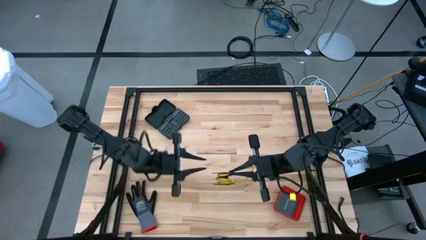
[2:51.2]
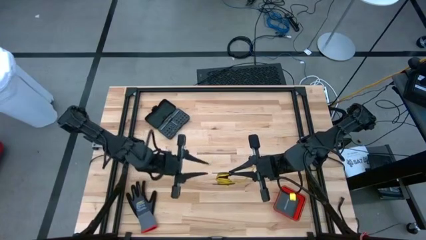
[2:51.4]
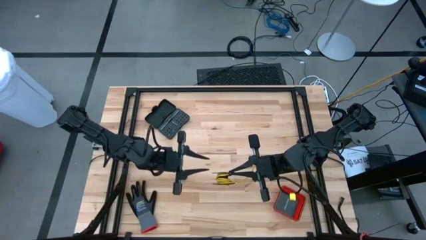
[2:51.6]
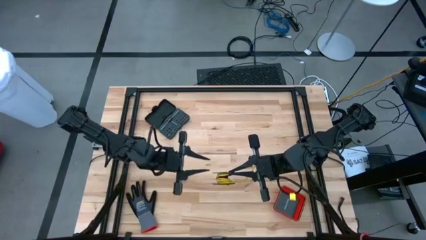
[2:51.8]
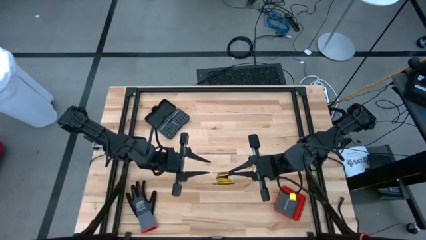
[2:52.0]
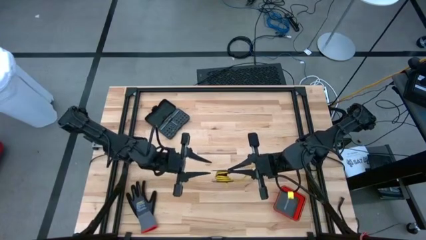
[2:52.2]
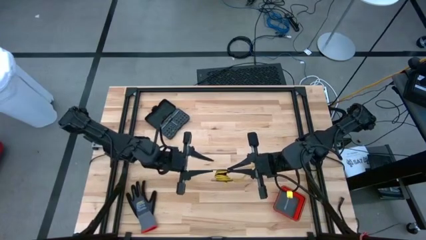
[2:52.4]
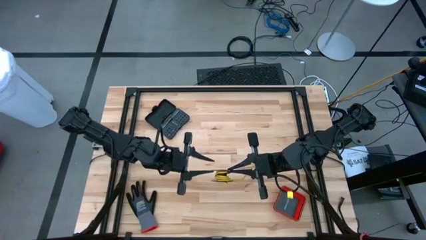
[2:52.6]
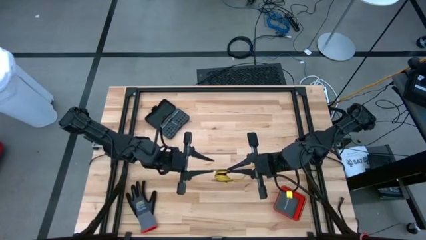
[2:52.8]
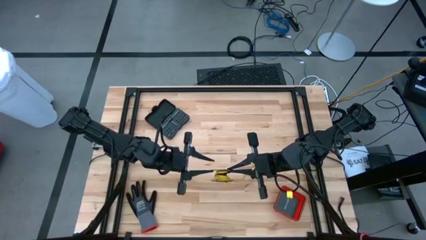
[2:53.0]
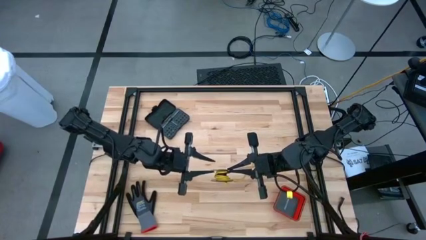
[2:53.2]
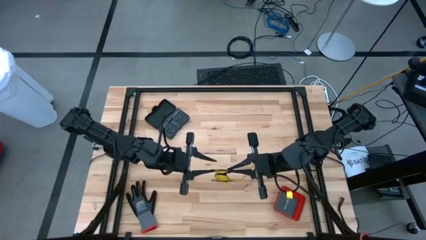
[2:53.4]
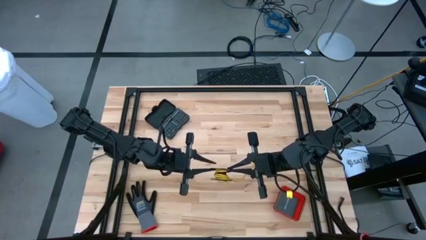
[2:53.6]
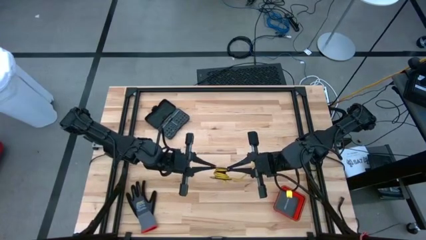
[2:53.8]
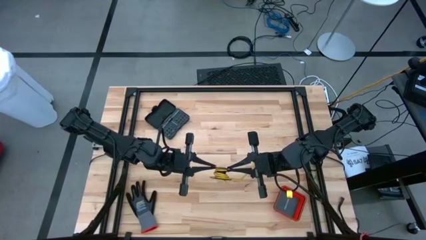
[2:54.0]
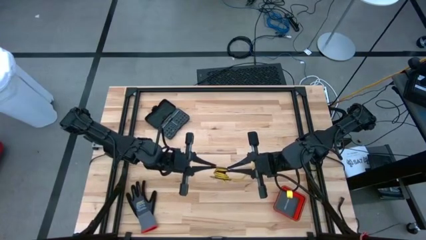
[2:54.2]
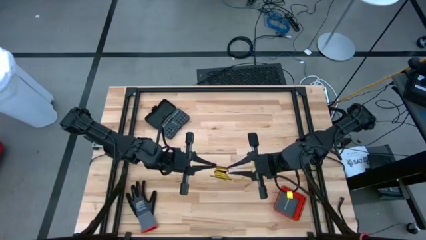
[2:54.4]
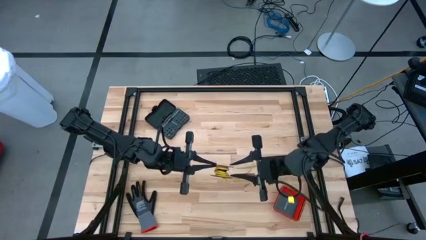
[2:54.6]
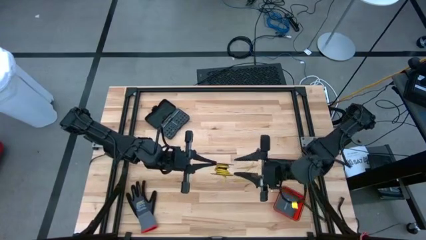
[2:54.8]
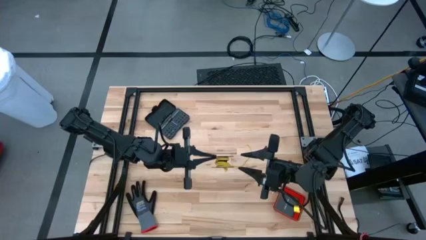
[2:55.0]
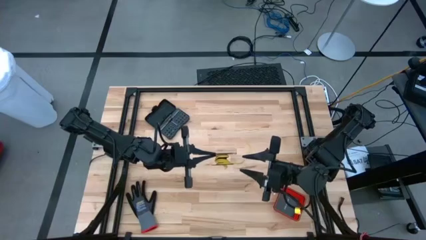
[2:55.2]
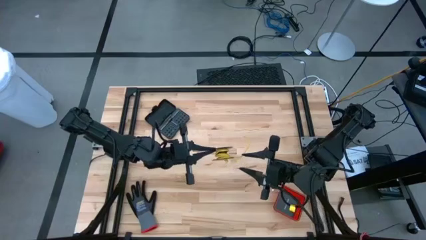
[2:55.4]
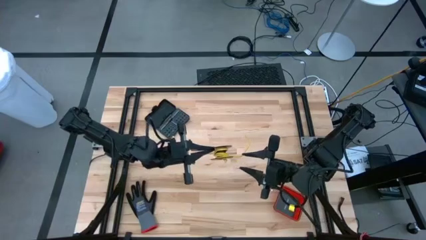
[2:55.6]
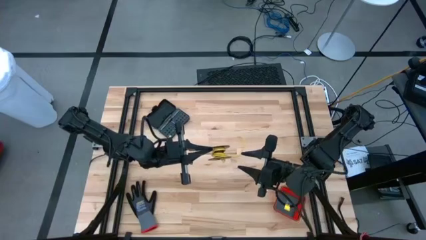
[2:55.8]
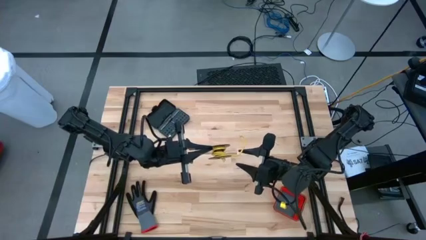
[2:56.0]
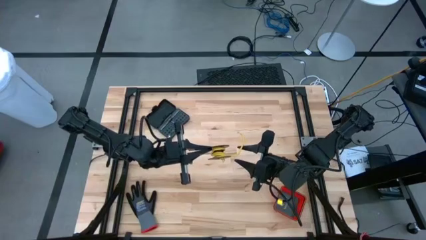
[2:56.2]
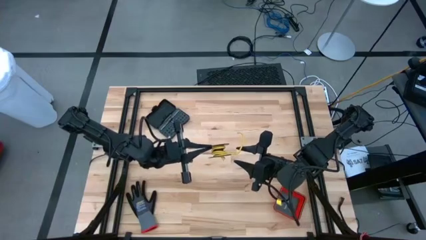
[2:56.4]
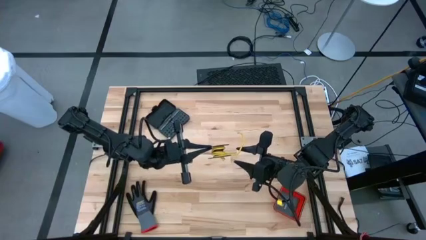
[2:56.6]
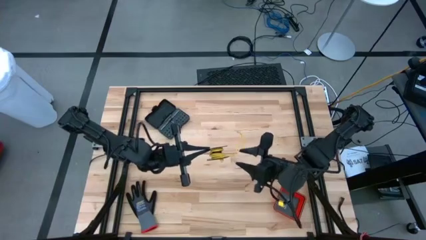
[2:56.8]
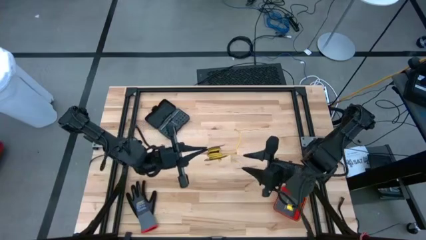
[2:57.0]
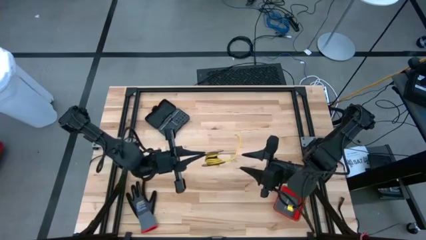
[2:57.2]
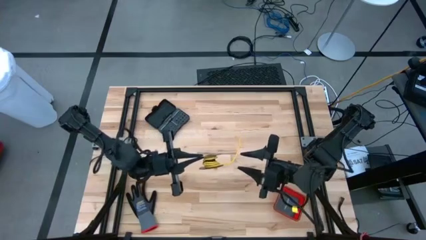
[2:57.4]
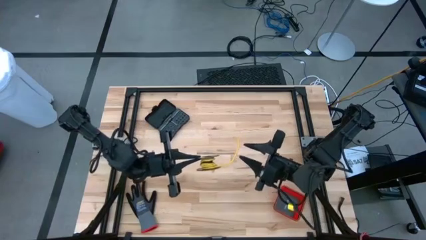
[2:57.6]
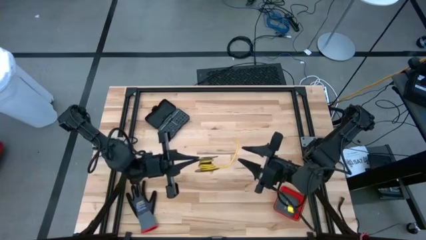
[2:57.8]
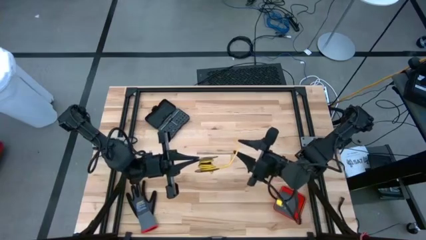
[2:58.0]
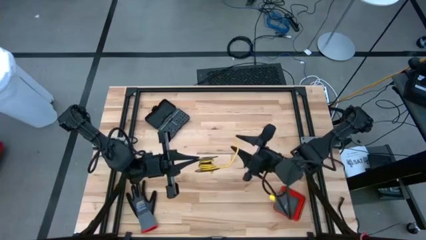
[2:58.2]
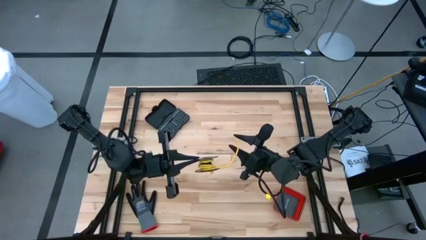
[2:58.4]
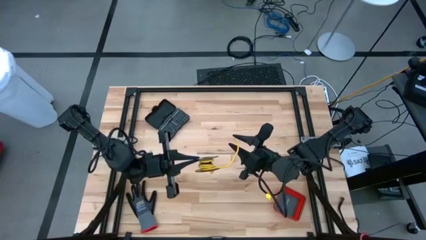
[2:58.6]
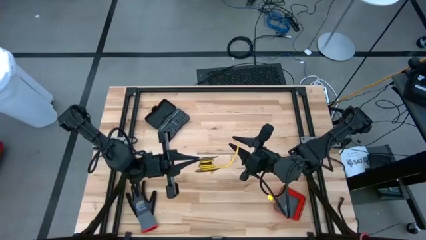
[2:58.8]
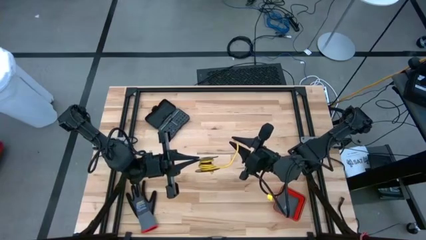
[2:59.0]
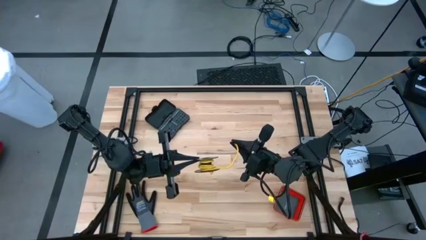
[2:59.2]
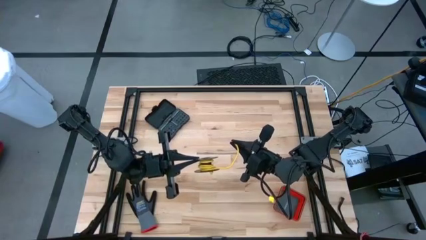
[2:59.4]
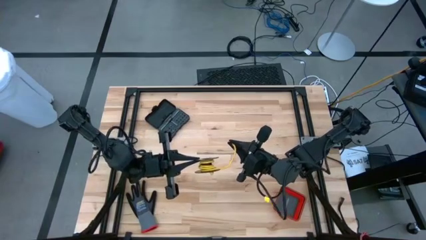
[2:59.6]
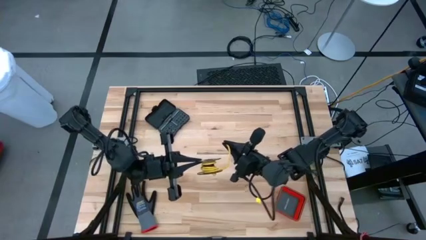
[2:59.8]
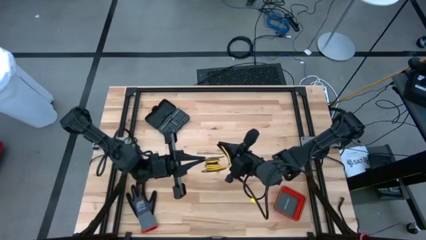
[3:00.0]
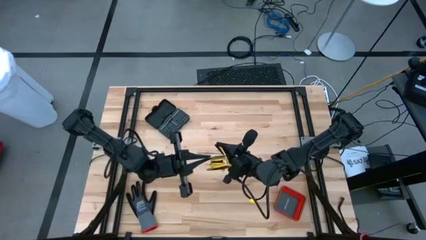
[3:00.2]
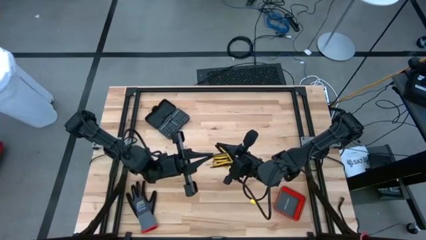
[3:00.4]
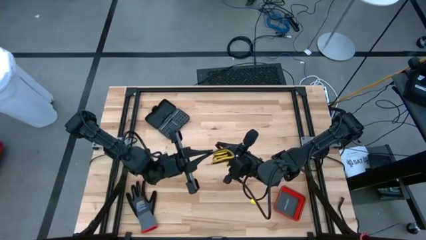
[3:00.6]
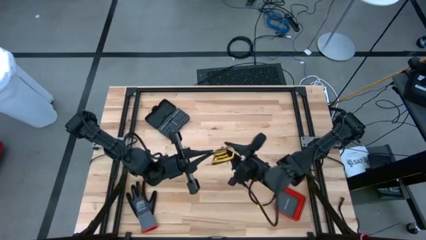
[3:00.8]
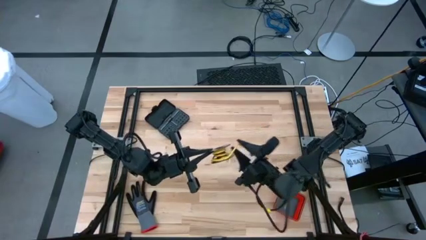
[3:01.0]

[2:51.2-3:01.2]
Task: Coil cords
Coil the yellow wire onto the spool

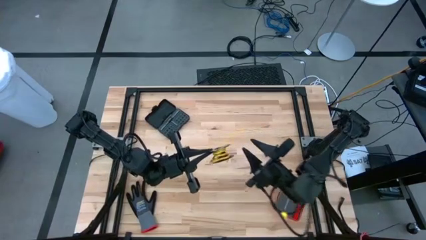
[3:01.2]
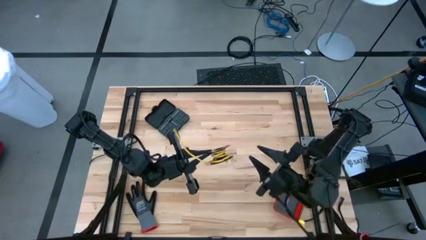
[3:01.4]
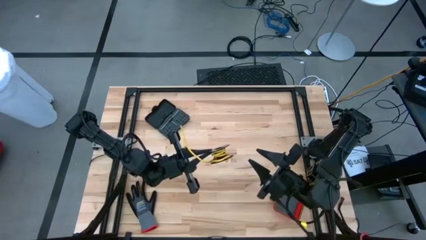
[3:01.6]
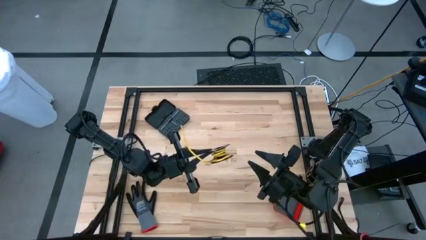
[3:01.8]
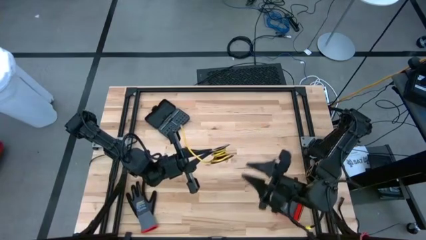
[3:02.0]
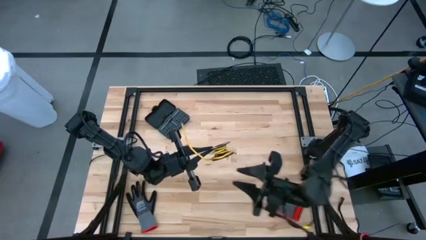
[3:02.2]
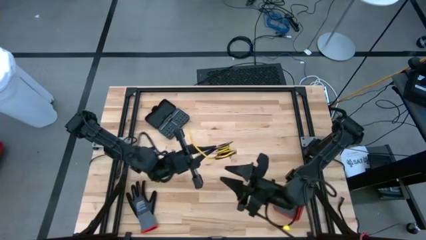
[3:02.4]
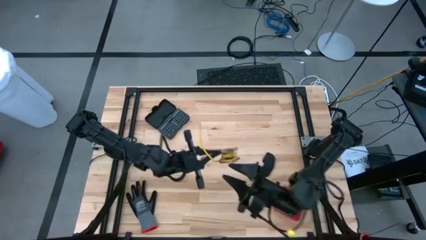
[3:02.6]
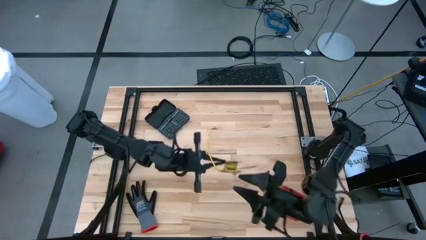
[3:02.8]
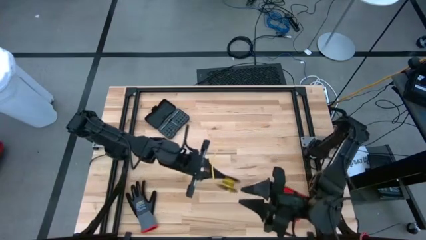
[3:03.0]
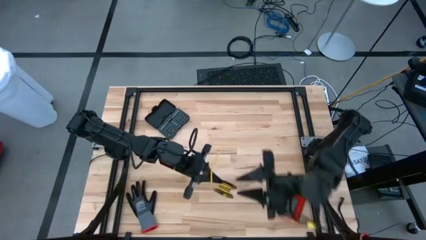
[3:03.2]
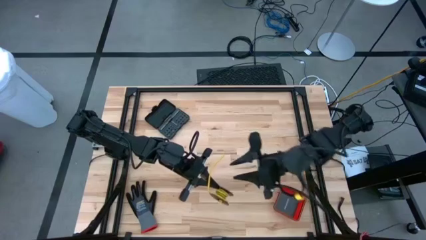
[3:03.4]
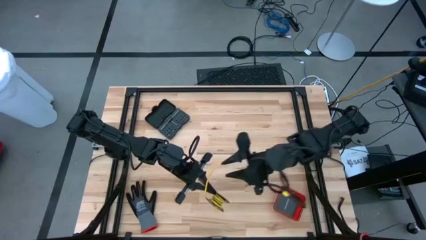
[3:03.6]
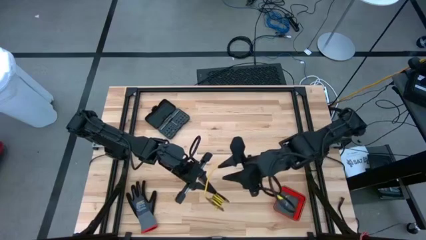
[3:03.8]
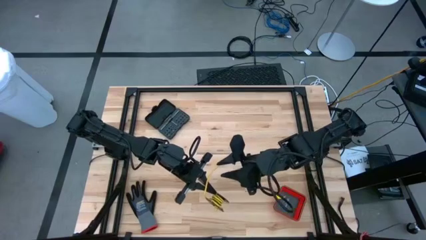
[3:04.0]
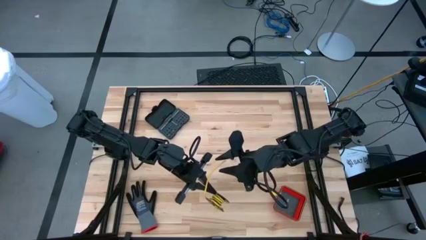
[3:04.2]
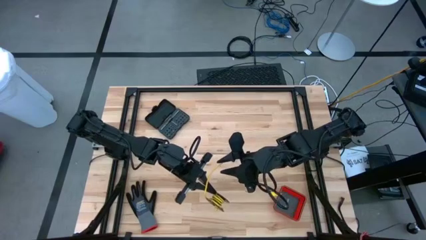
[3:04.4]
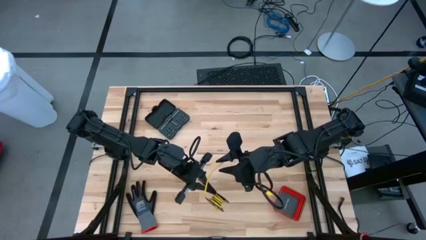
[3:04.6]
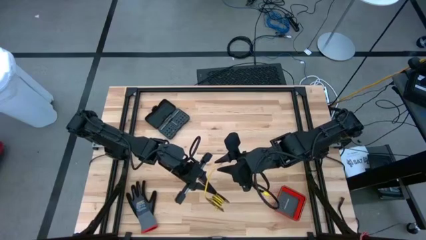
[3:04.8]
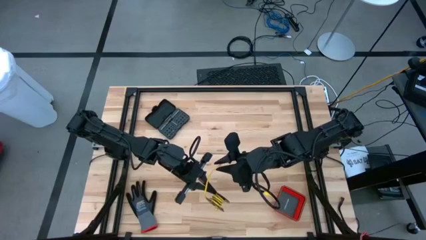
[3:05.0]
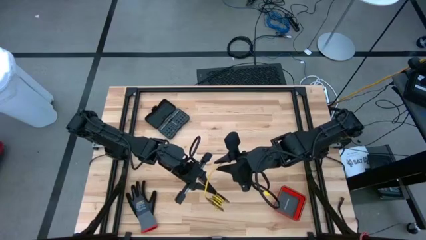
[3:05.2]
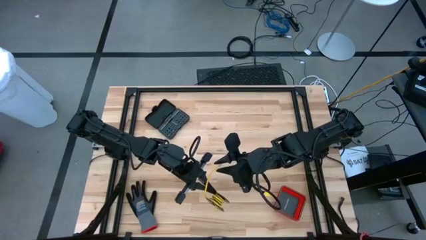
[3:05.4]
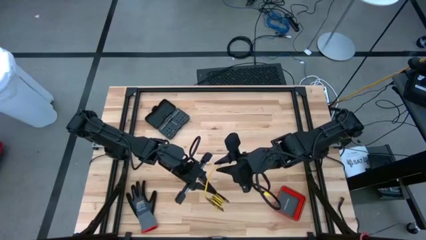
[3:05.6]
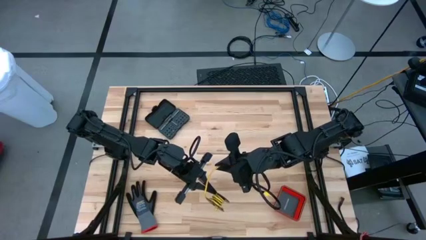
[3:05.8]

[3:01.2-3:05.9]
Coil the yellow wire onto the spool
